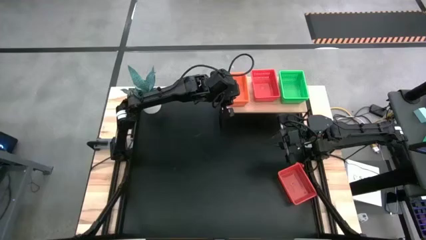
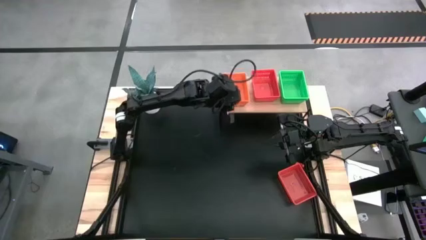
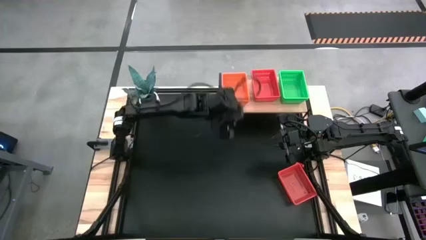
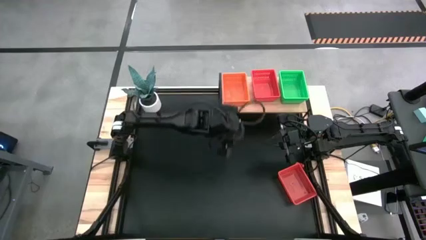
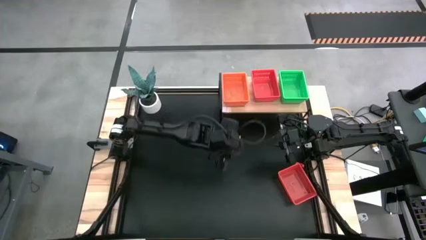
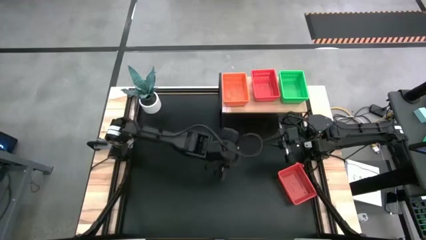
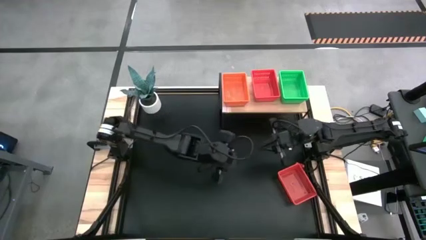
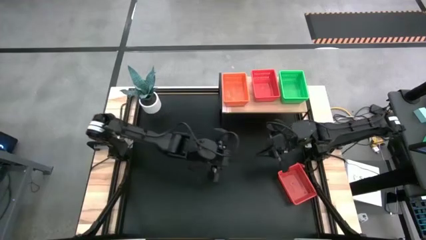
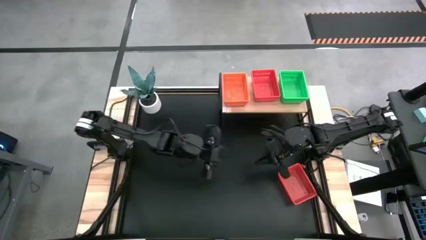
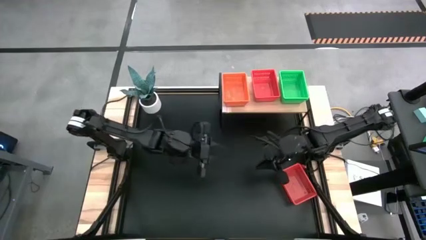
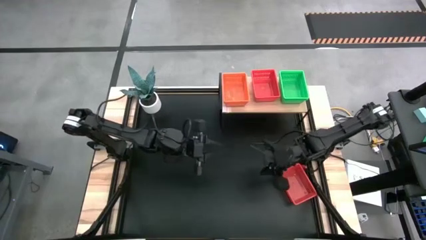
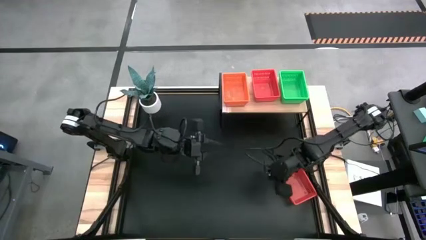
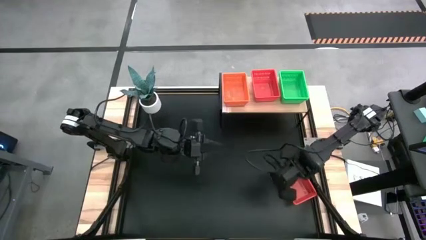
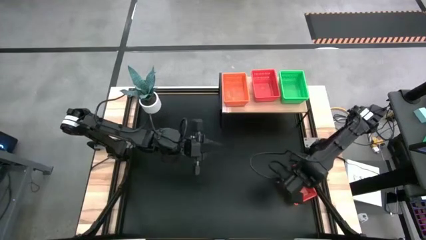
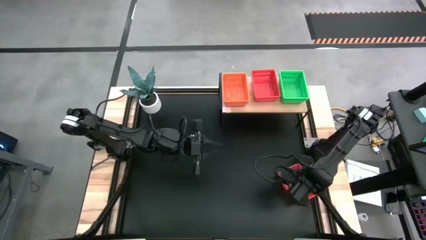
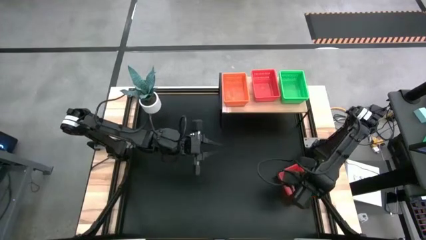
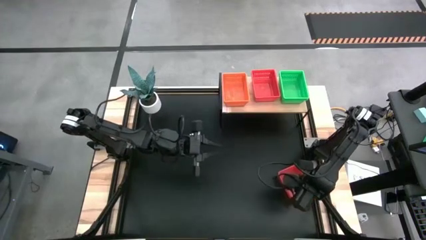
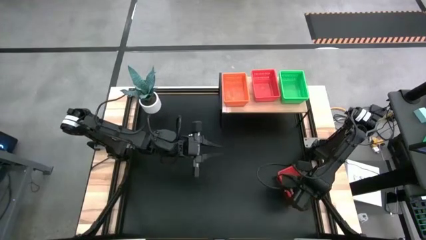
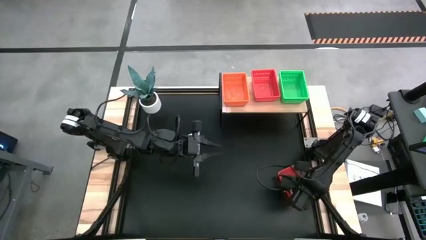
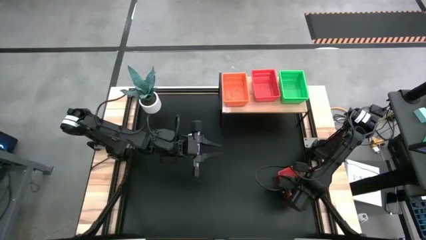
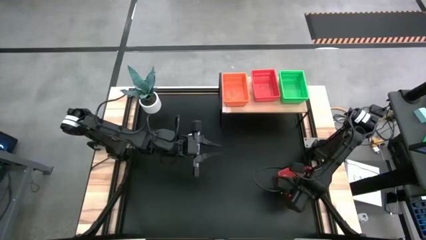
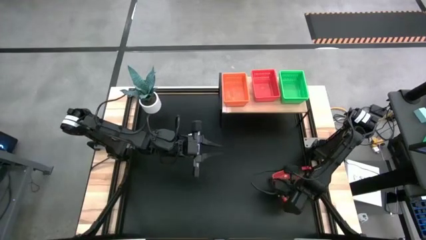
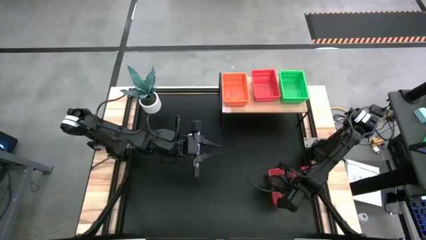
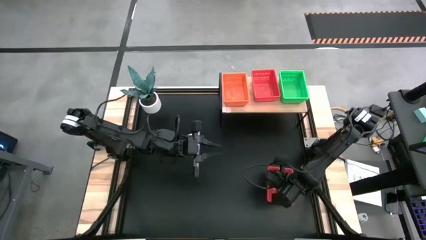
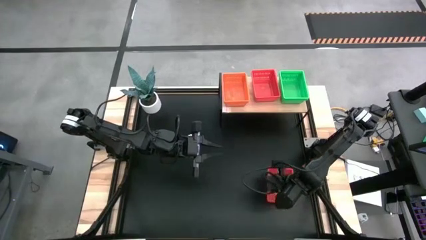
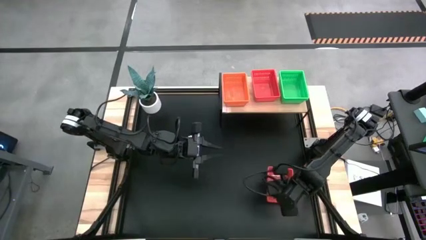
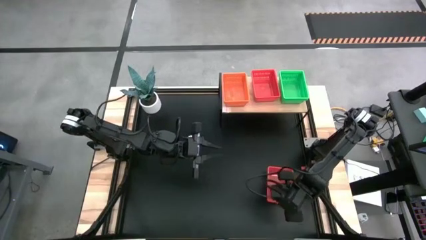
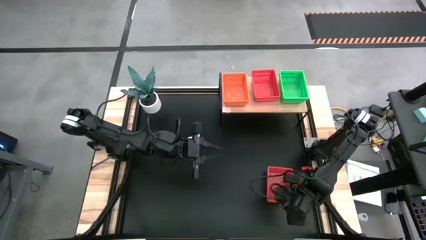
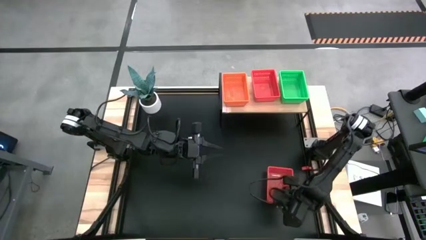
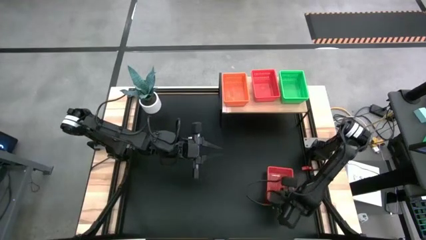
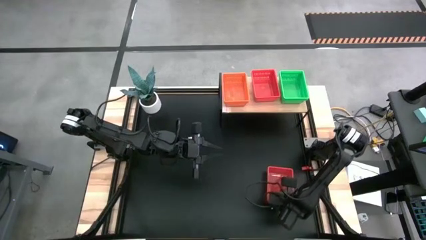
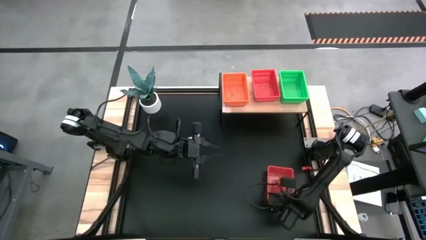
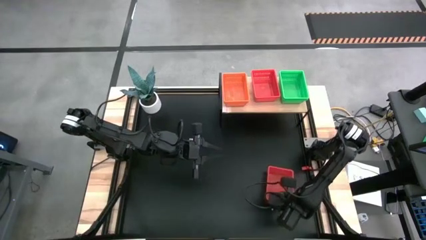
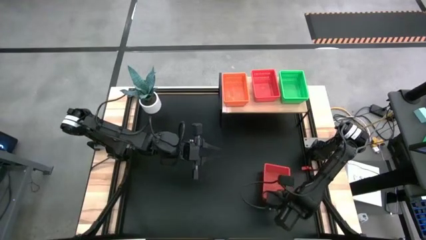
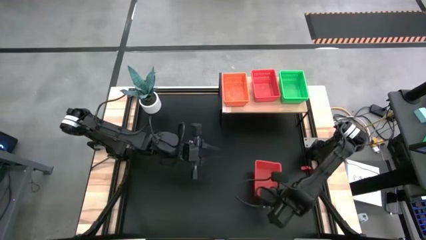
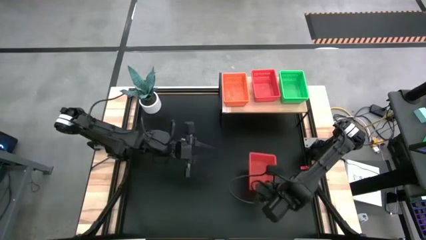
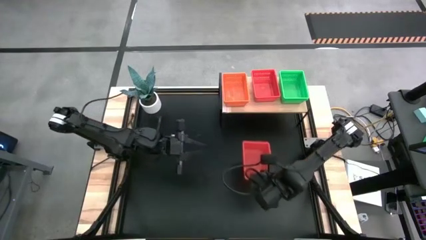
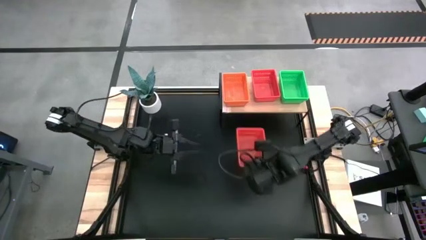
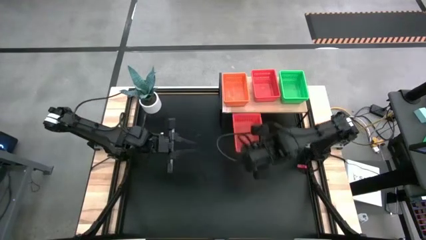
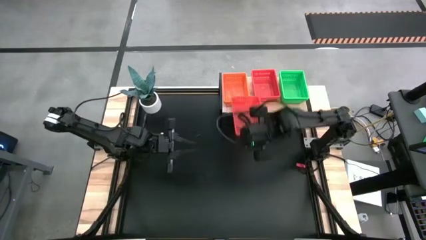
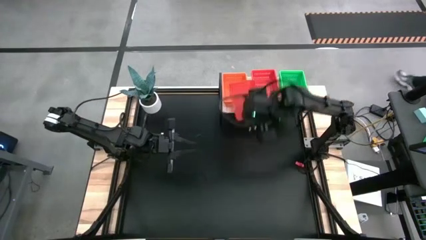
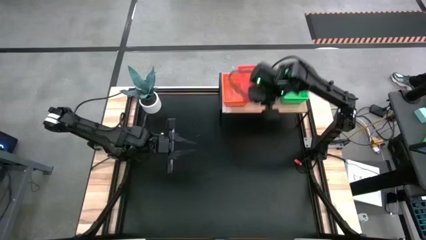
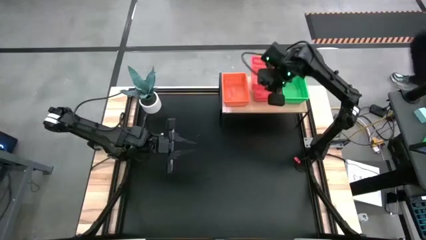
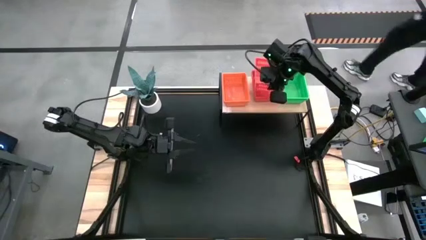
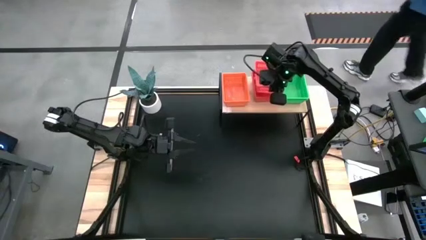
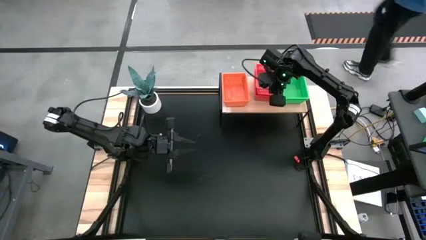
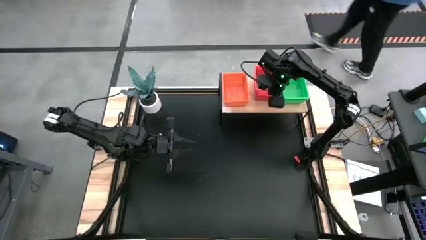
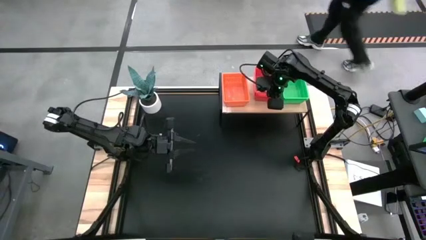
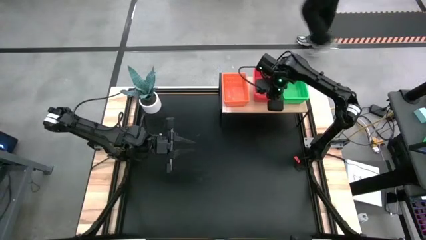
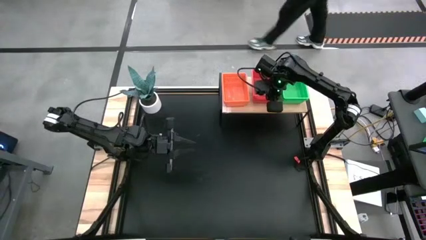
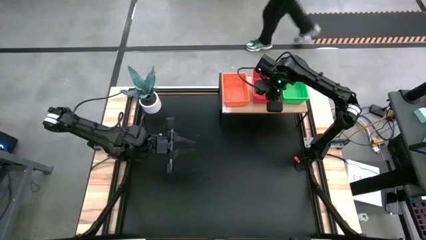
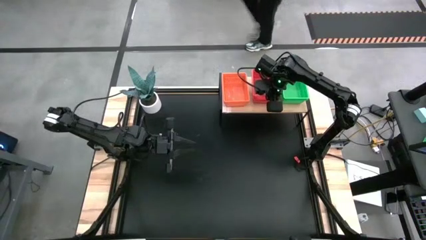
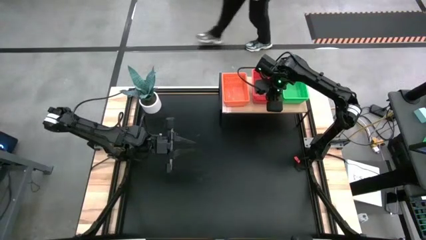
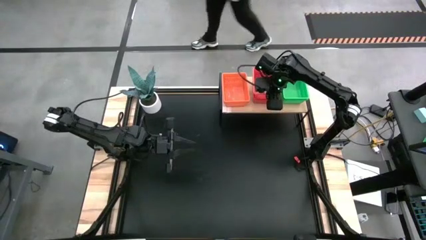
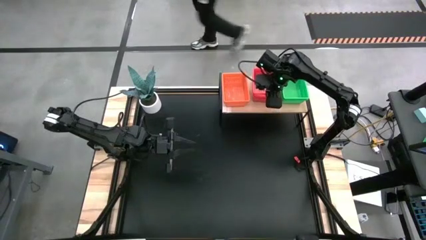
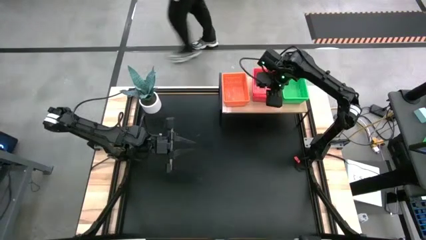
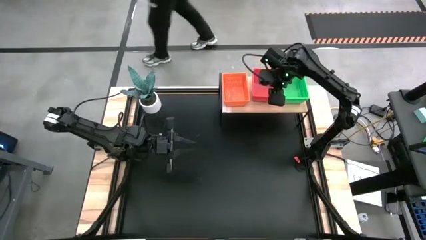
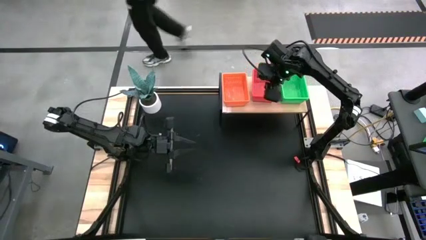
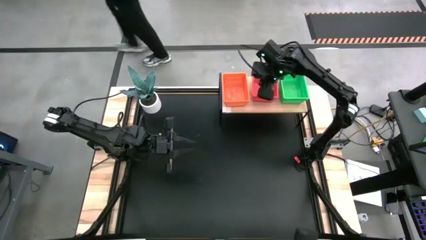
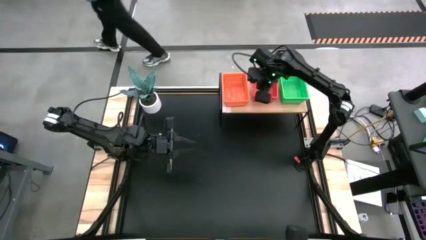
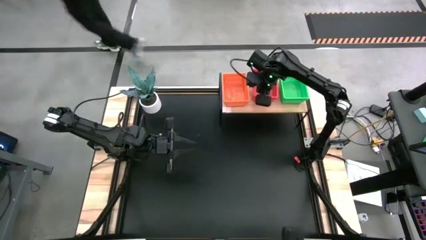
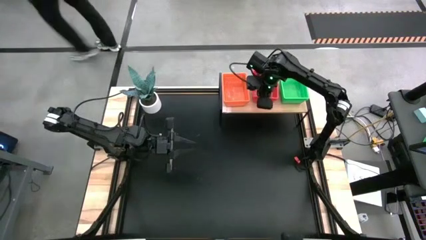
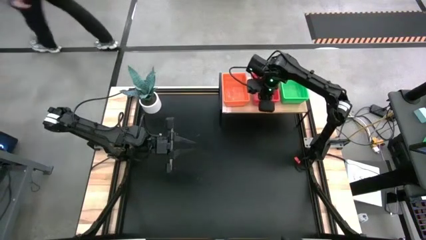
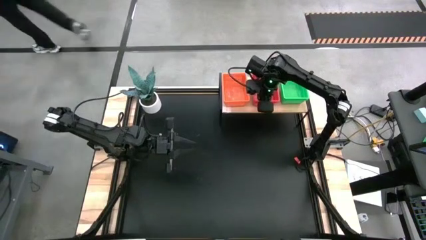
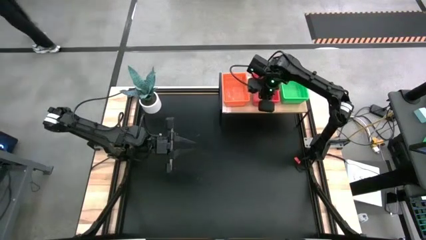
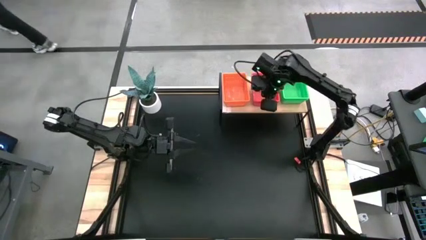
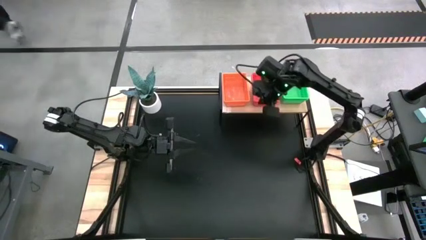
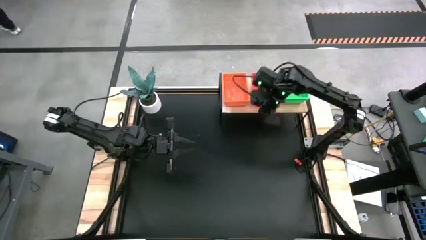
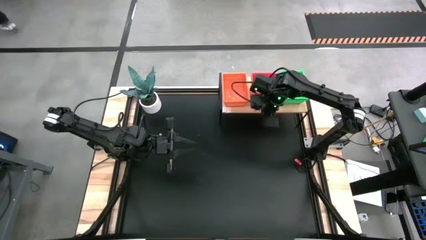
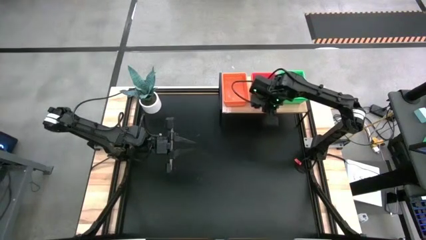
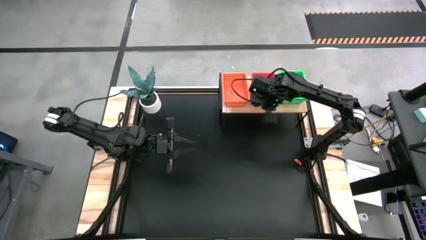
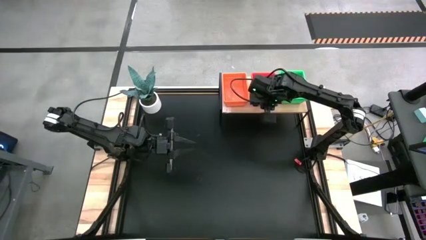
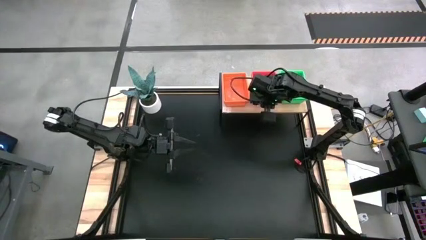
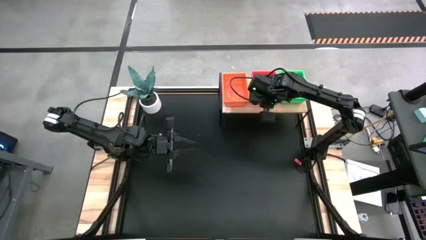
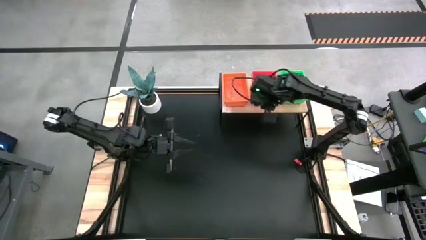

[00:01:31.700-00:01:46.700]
Task: Stack baskets on shelf by color
Stack the red bin on the other red bins on the shelf
